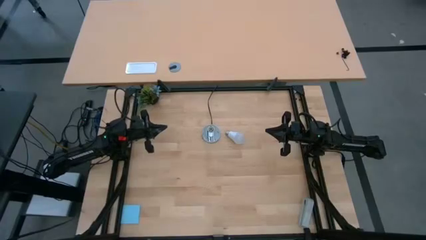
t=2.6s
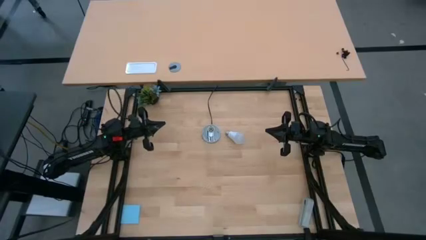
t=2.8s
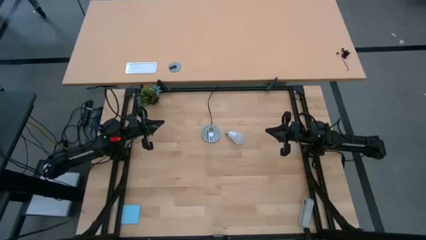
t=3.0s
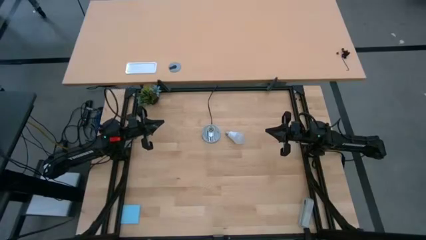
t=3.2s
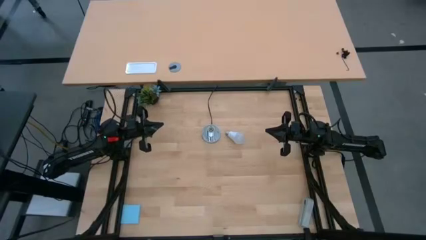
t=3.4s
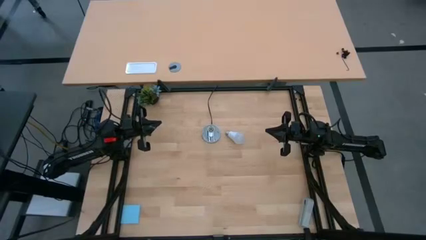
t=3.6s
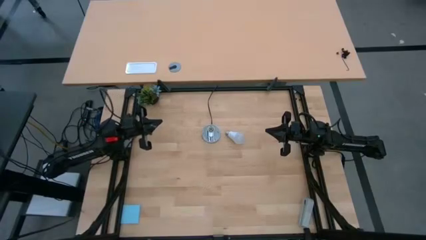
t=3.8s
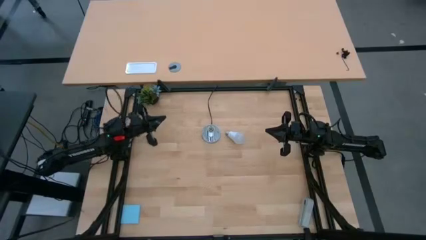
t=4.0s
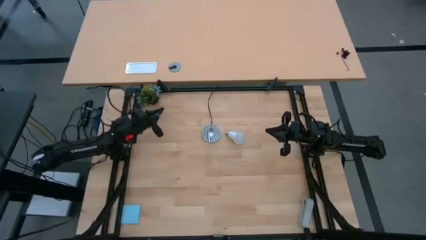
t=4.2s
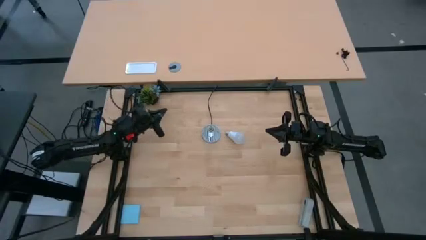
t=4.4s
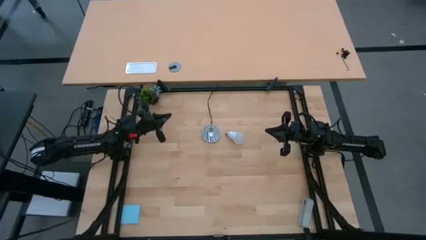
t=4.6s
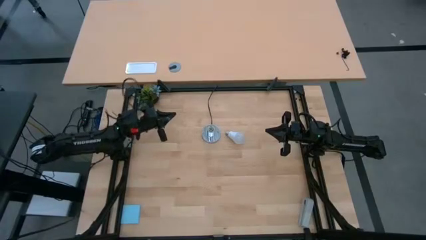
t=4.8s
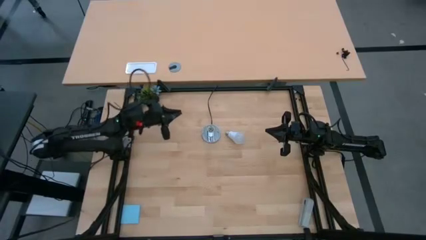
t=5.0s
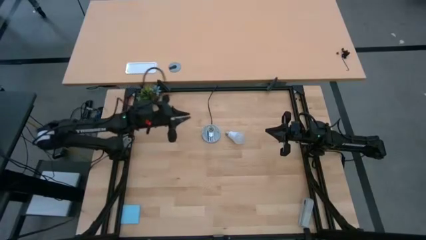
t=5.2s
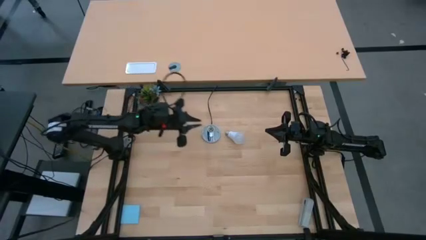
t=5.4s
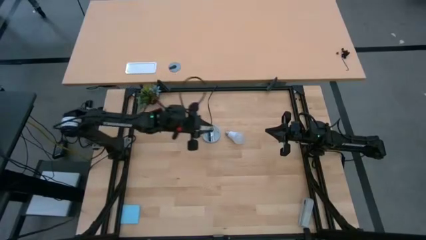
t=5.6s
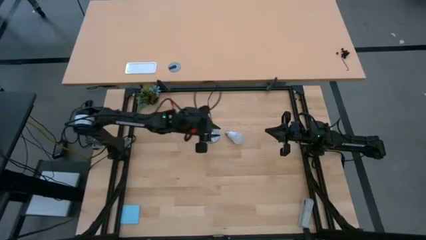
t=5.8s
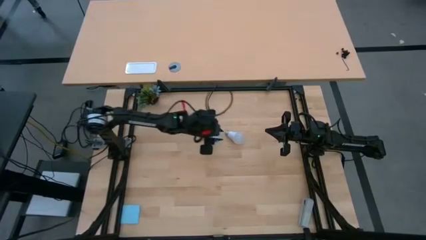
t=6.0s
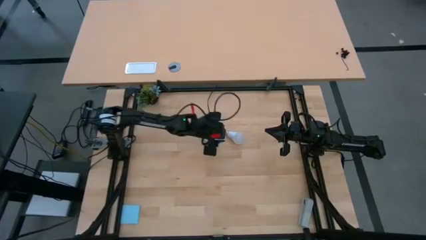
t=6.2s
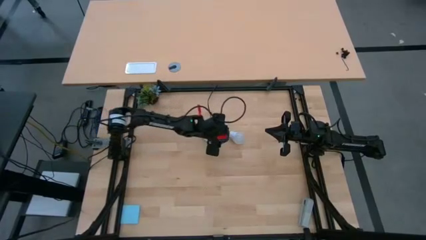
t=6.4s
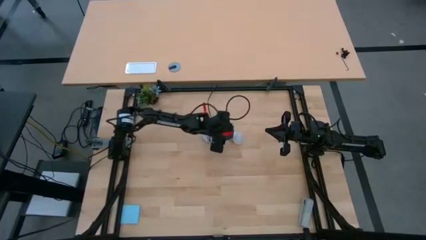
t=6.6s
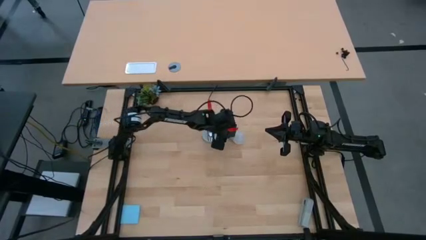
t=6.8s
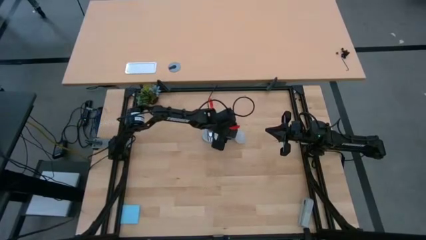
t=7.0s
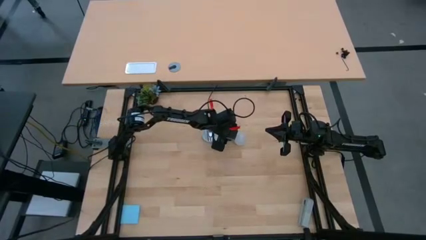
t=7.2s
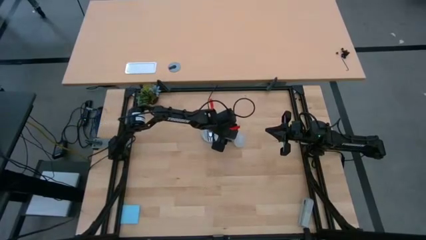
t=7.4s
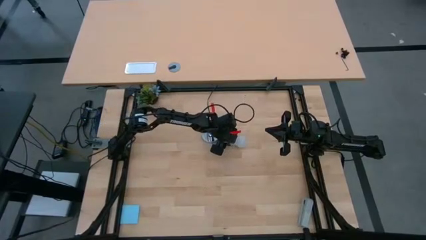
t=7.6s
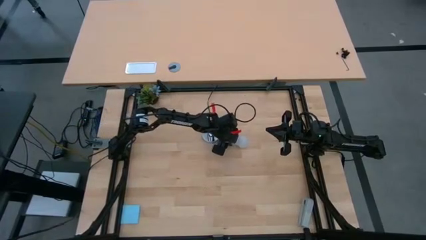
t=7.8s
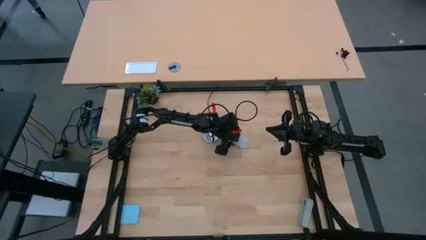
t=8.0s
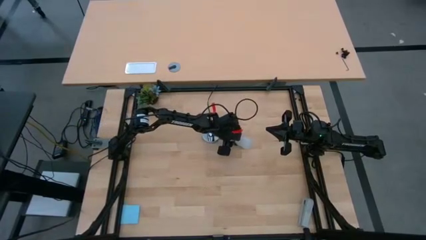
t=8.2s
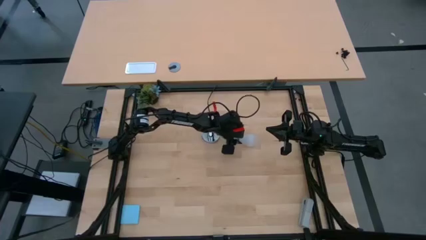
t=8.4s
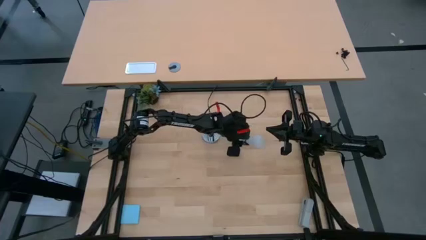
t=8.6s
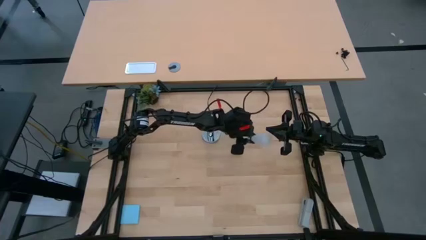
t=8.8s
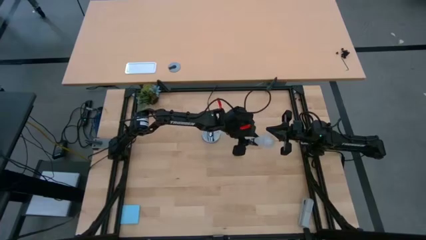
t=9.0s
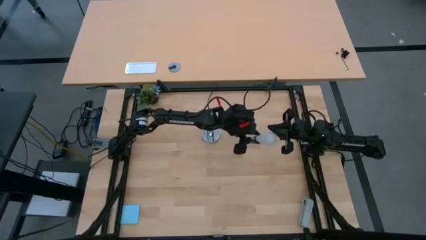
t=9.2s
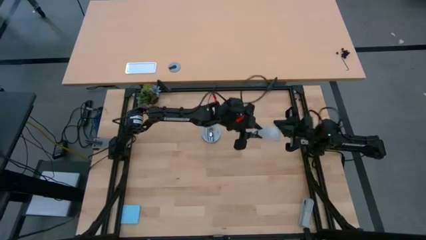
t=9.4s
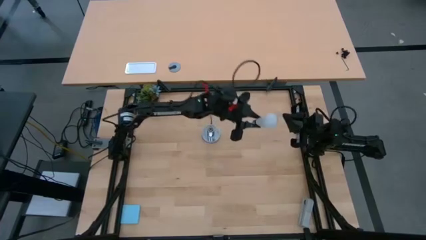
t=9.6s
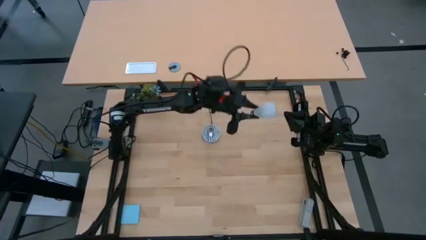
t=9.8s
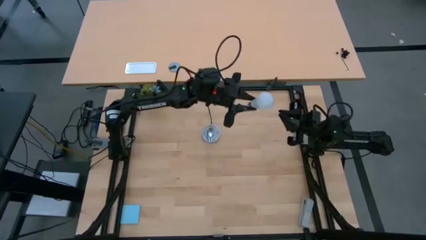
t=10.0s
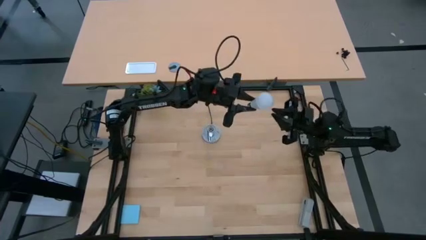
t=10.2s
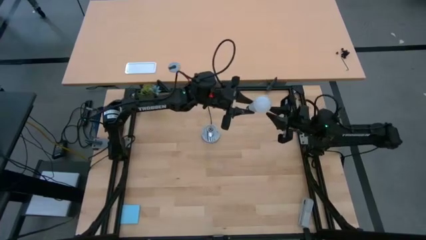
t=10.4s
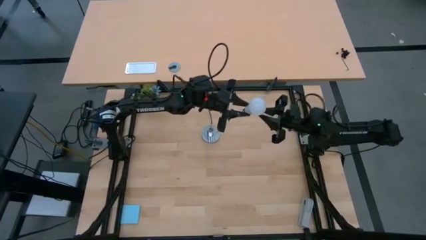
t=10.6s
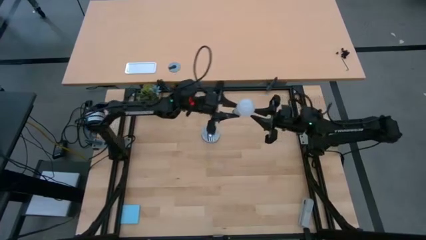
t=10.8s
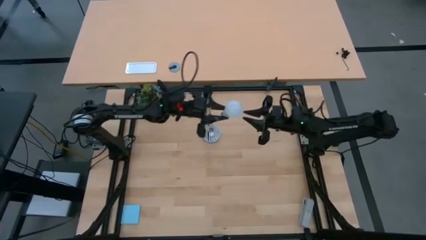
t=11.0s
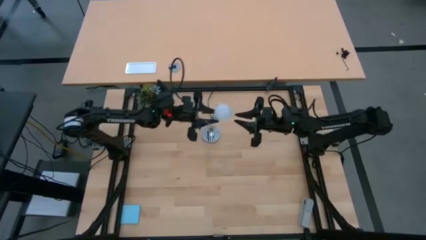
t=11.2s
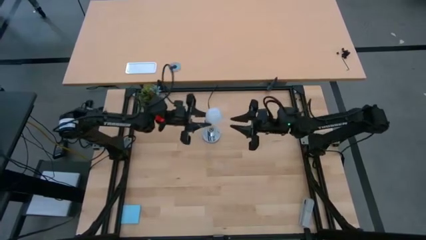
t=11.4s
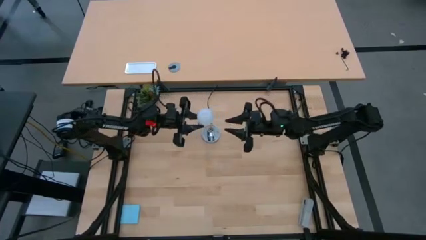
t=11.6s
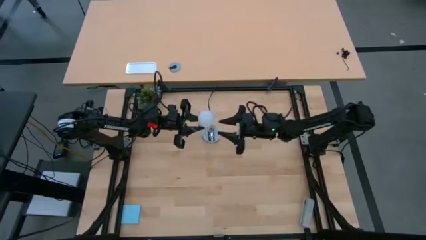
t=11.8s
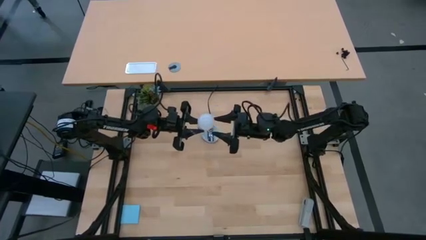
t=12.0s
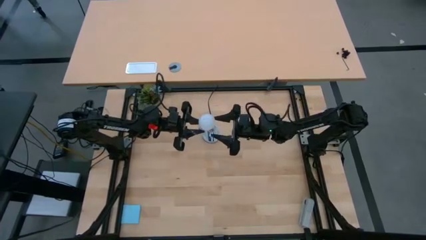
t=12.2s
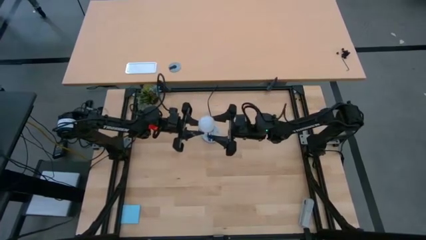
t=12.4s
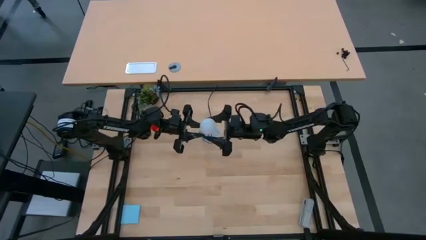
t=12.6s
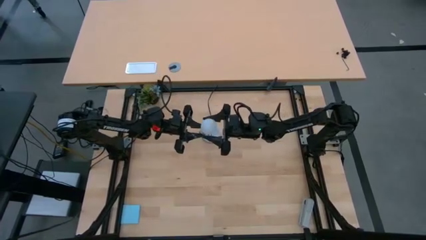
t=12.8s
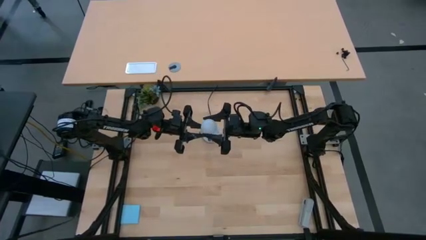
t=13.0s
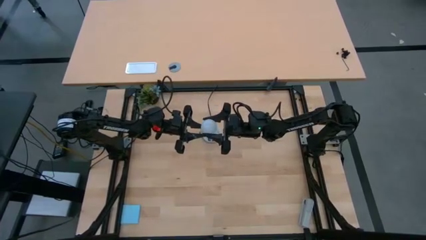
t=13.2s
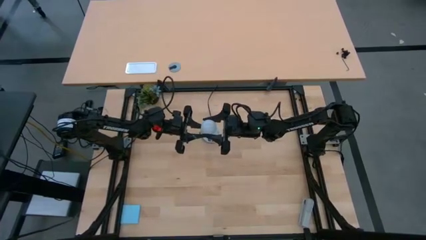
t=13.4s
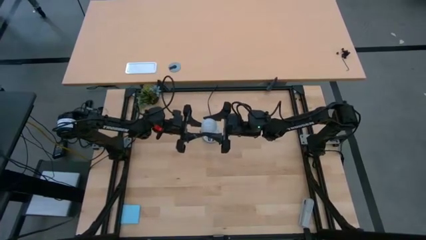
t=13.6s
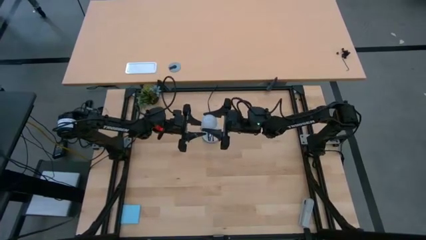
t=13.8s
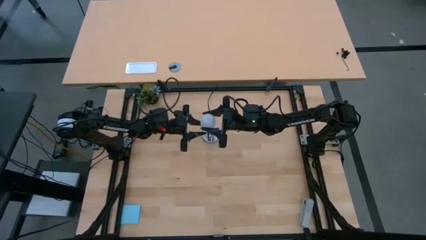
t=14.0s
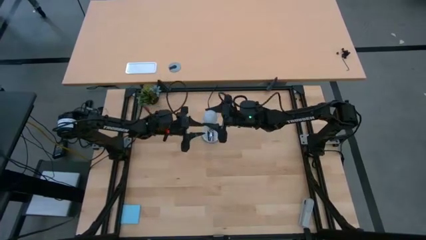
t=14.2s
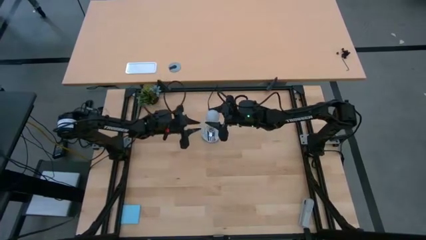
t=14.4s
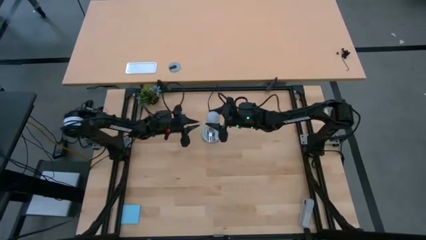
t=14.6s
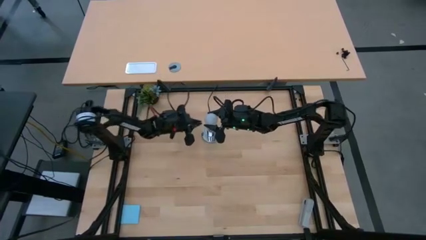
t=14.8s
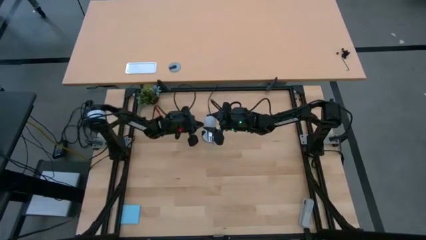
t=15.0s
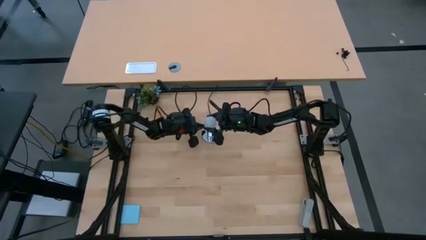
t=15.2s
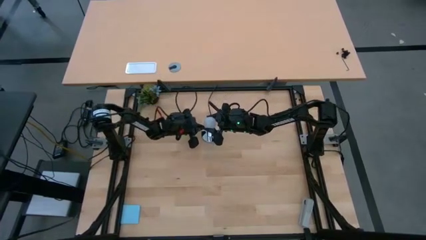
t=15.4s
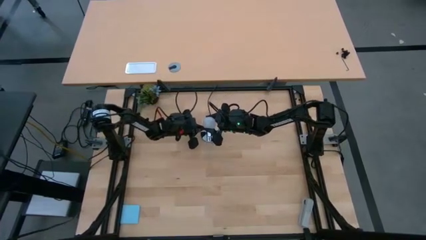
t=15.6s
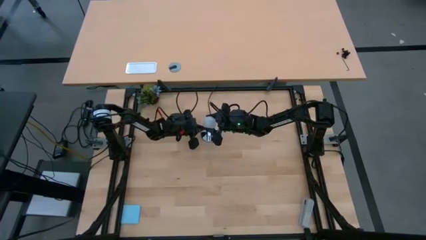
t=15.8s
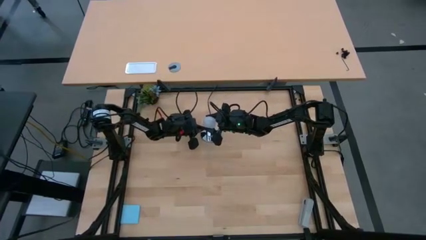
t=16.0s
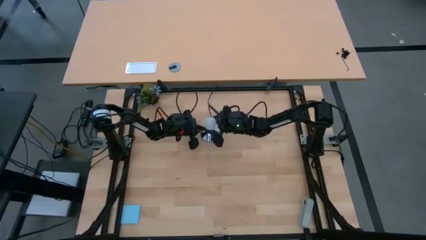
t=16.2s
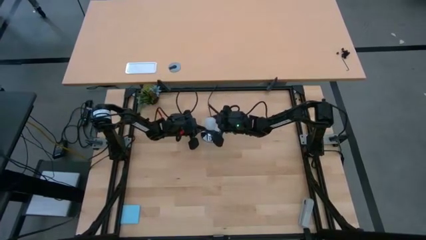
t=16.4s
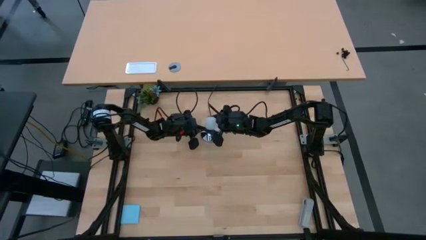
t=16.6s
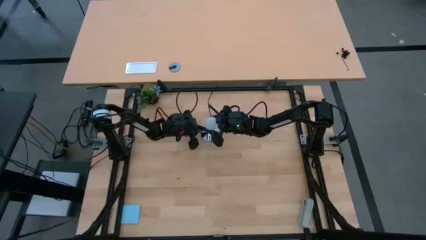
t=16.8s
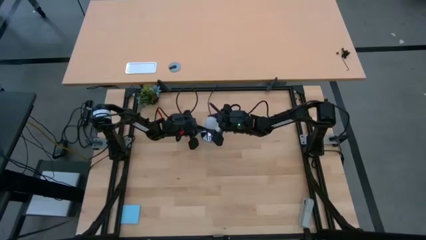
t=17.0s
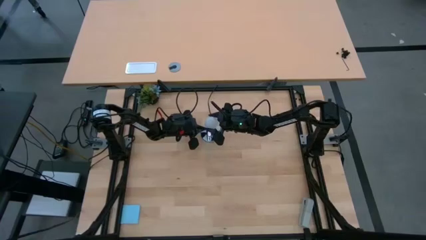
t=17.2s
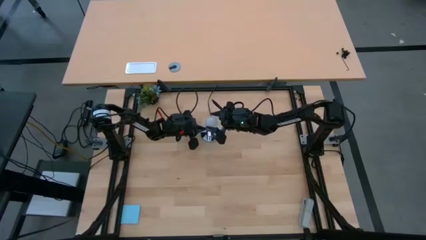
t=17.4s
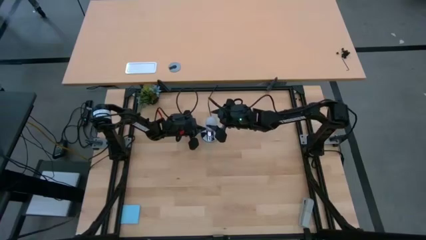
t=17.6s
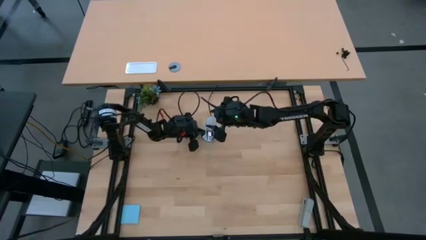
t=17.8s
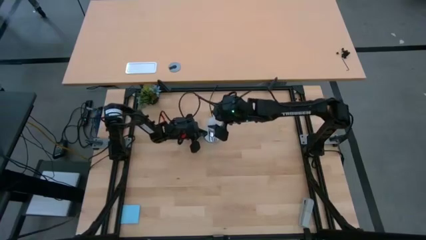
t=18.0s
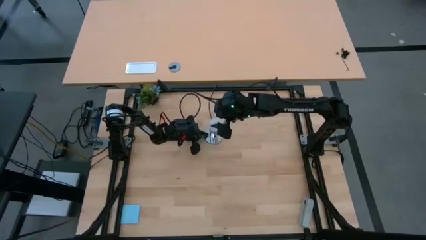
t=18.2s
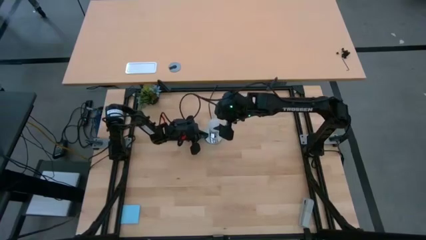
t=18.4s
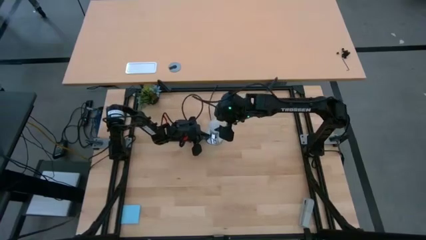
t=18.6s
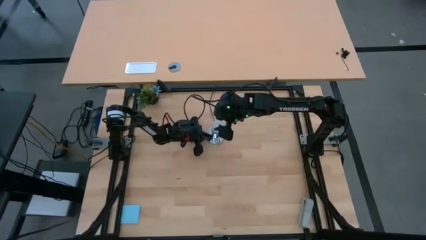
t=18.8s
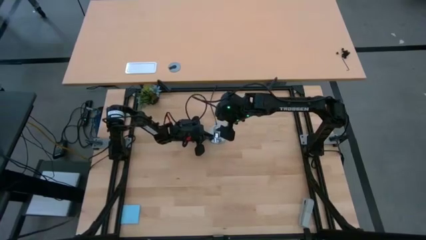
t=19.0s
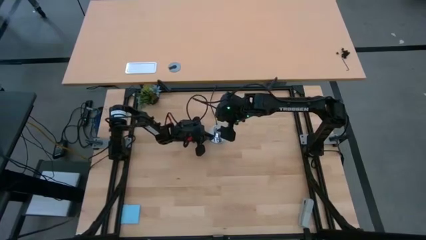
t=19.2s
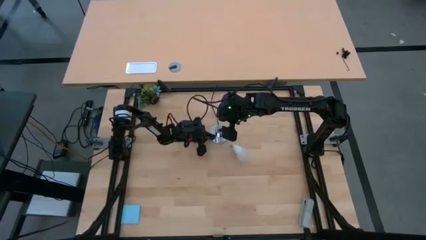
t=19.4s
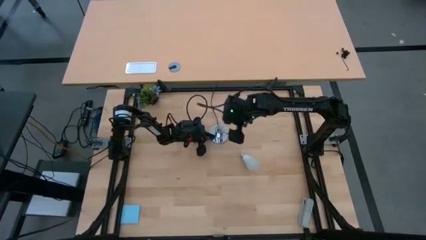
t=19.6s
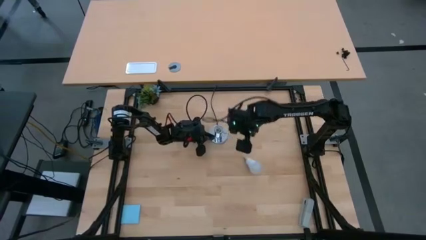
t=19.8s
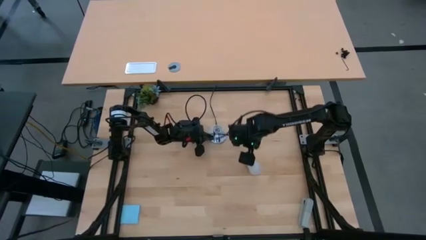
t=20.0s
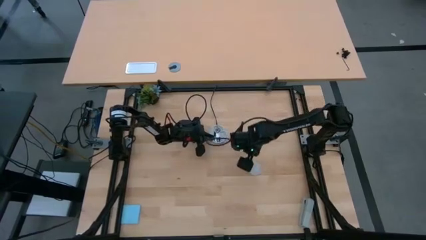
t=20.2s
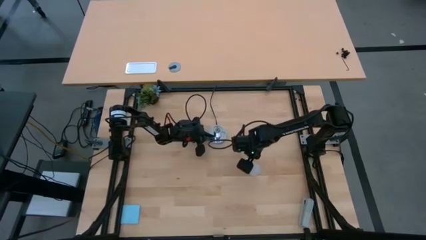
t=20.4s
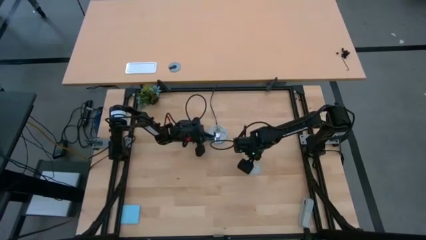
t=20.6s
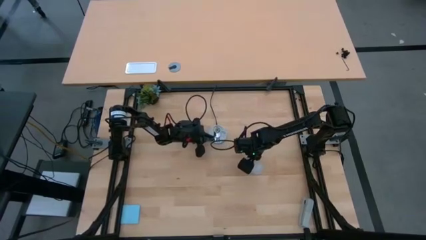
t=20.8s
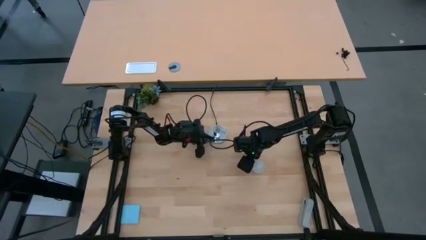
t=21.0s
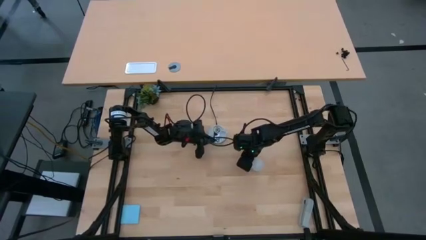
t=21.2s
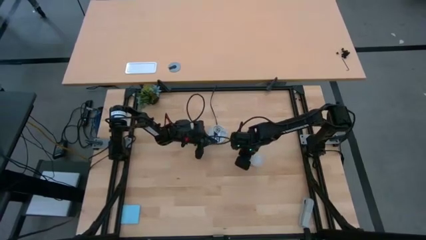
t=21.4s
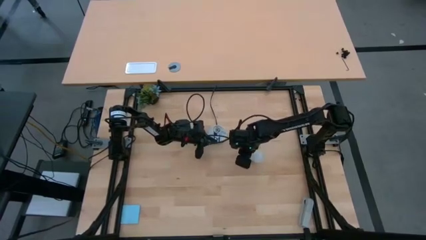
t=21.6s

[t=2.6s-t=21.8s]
Task: Screw lightbulb
Insert the white lightbulb into the silver lamp
